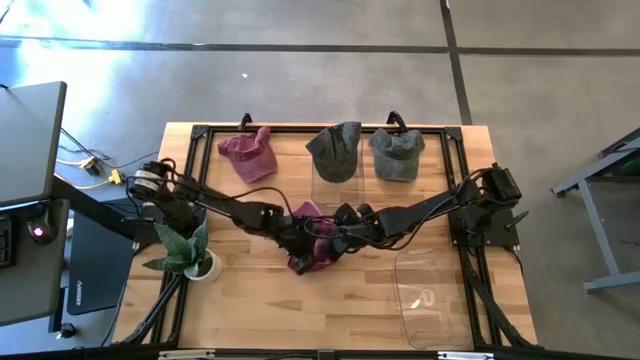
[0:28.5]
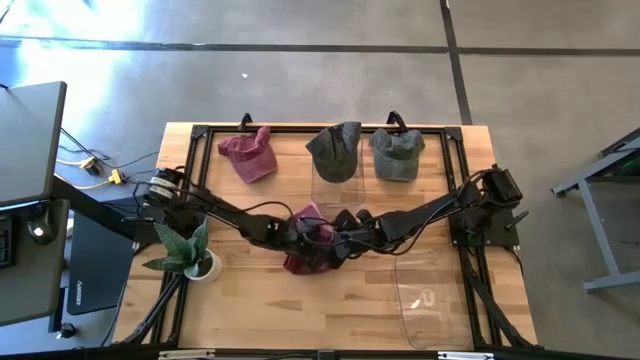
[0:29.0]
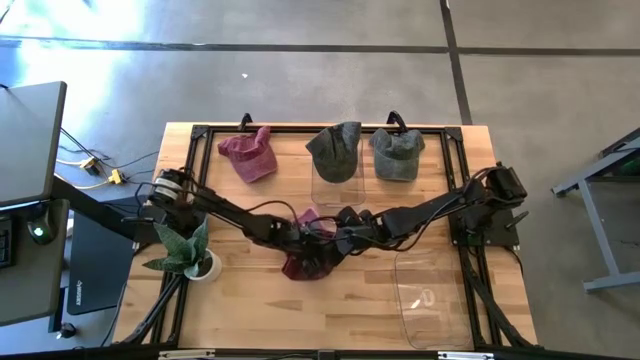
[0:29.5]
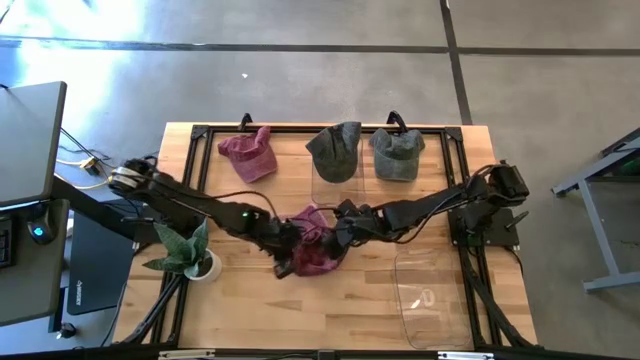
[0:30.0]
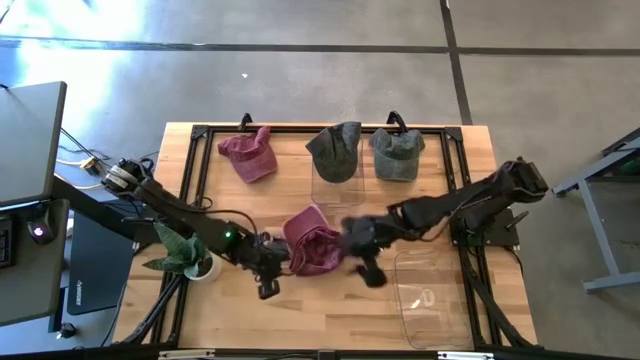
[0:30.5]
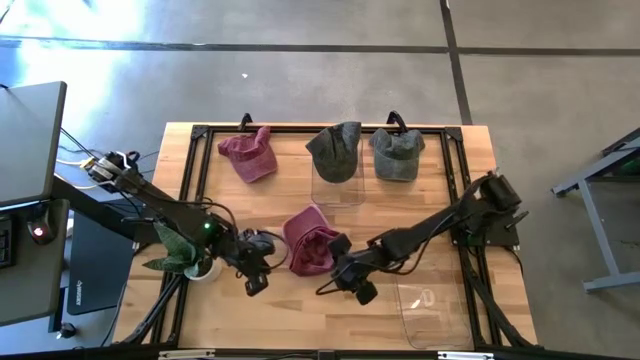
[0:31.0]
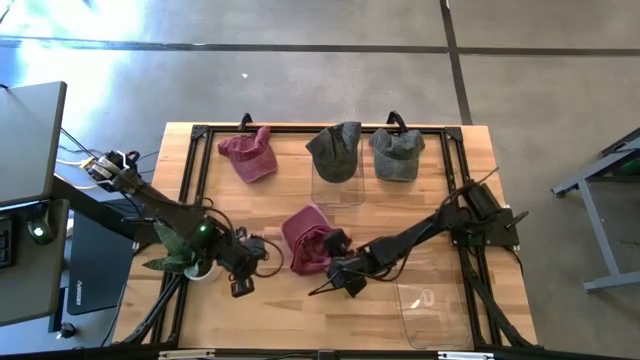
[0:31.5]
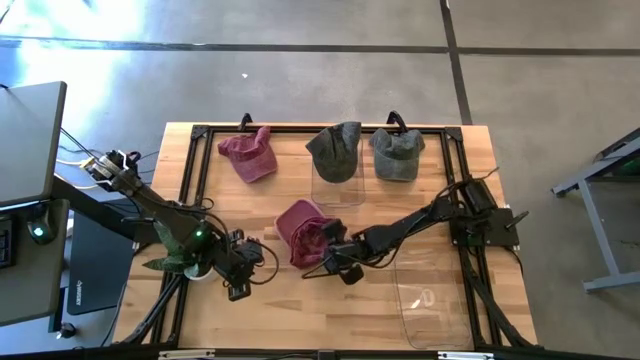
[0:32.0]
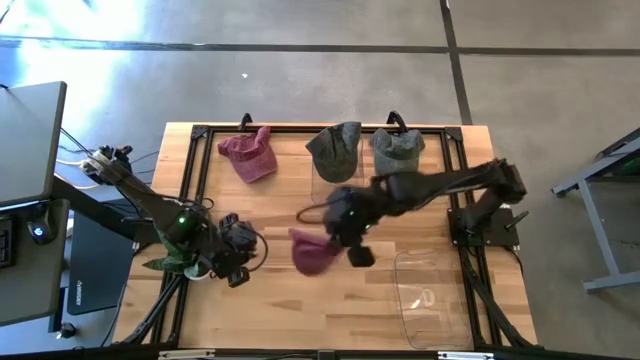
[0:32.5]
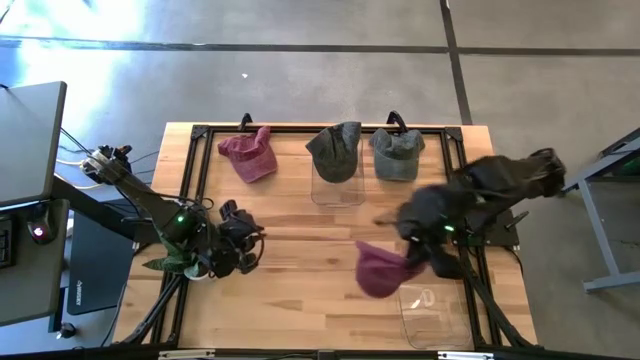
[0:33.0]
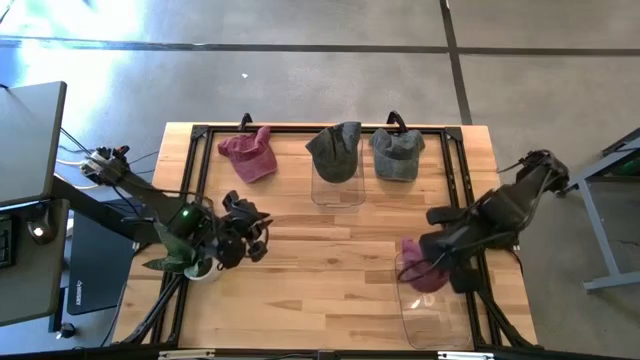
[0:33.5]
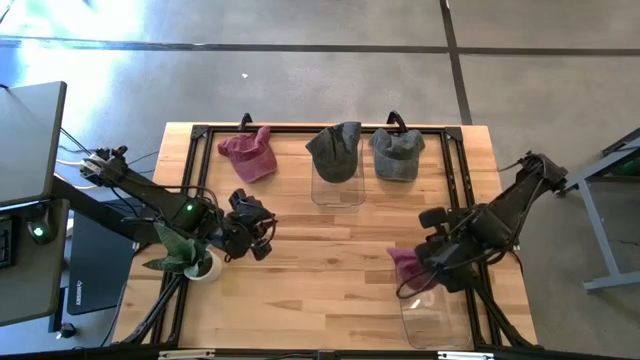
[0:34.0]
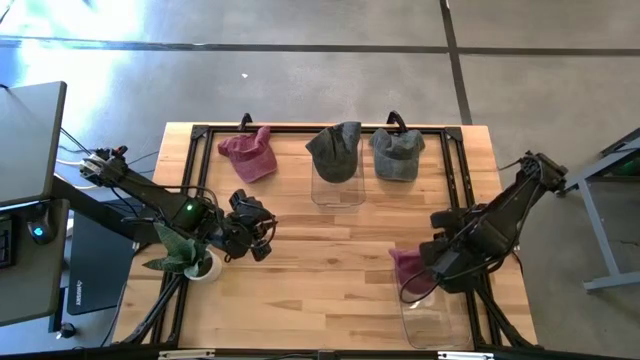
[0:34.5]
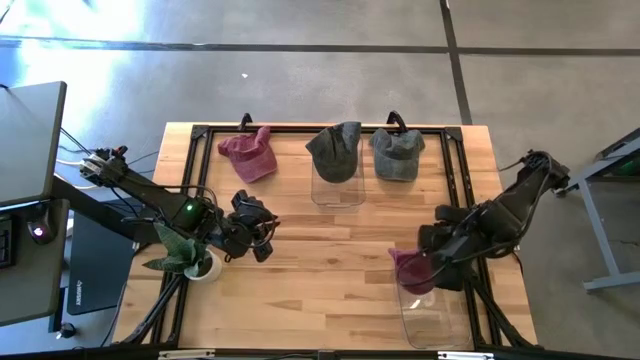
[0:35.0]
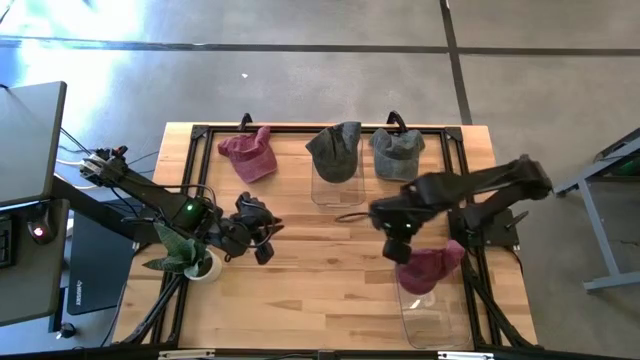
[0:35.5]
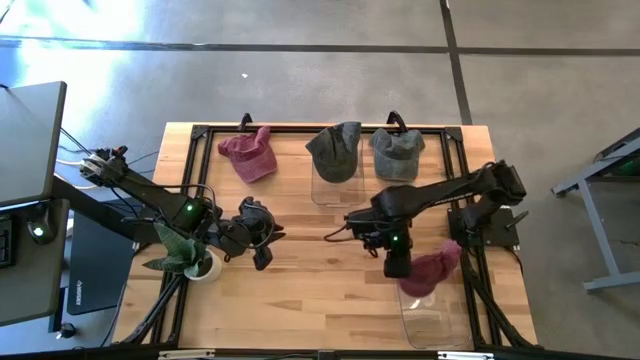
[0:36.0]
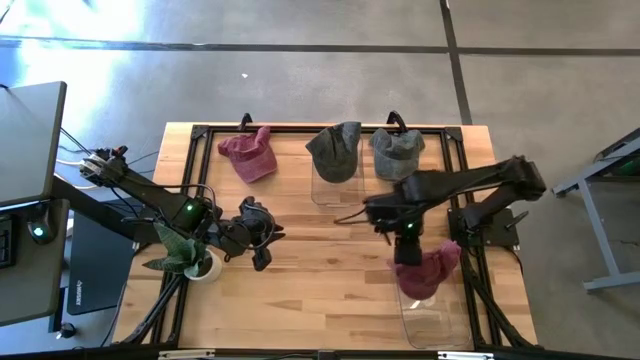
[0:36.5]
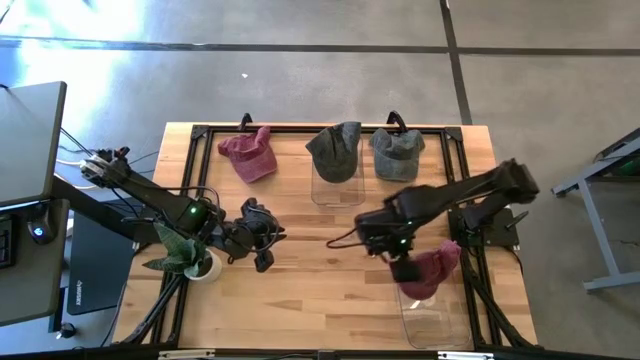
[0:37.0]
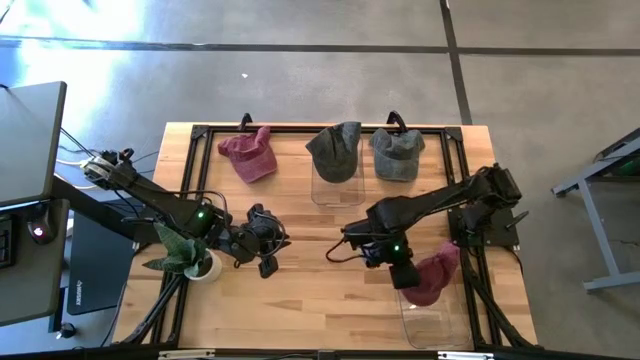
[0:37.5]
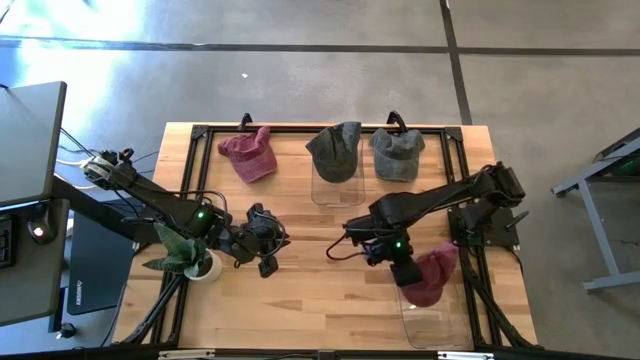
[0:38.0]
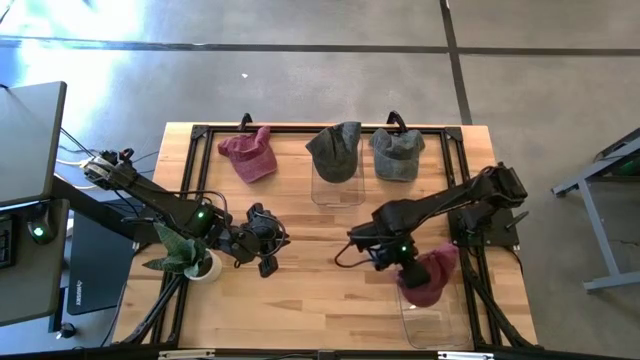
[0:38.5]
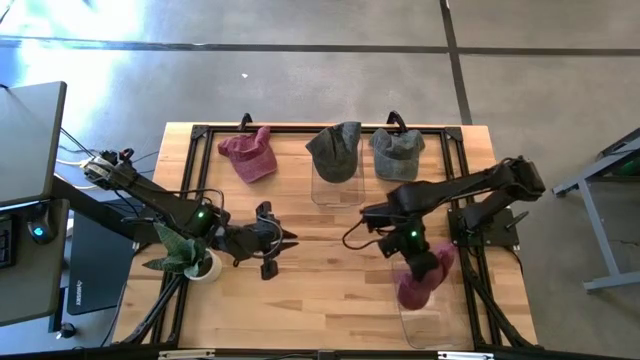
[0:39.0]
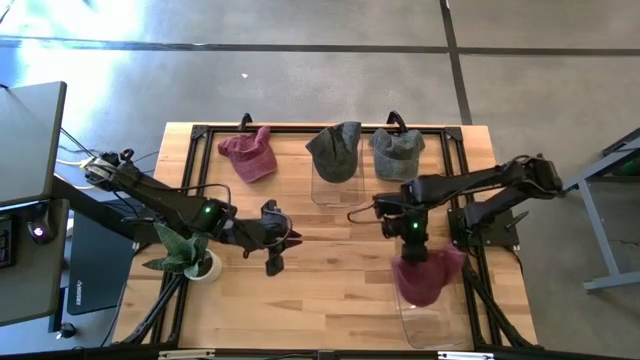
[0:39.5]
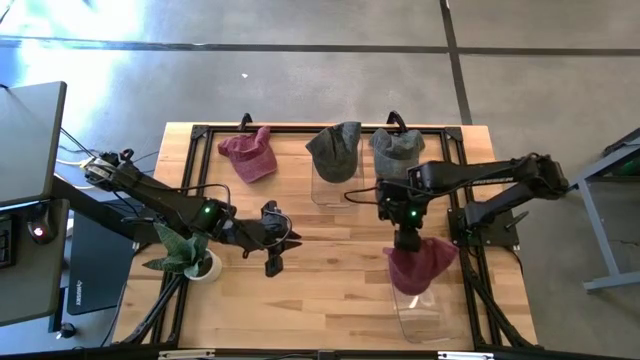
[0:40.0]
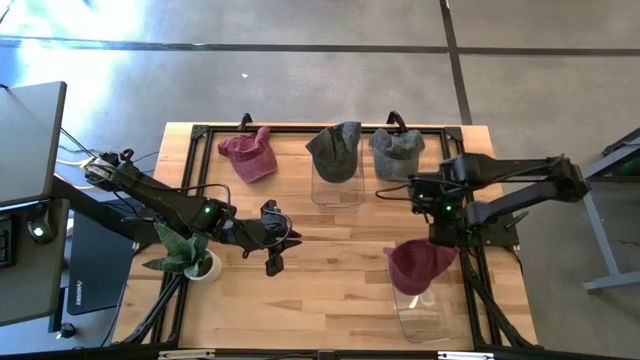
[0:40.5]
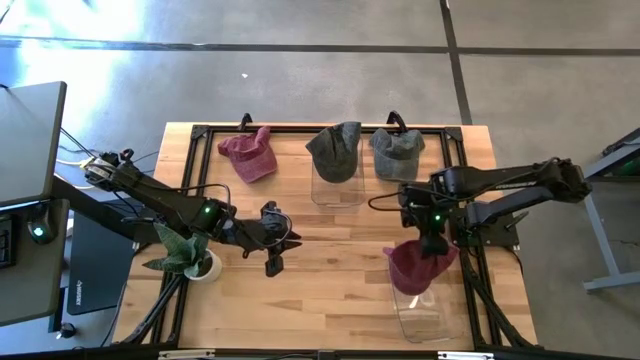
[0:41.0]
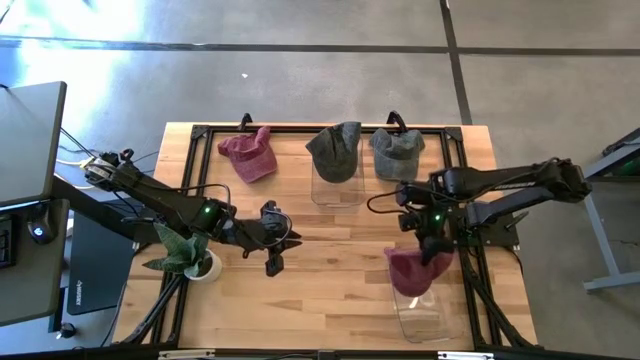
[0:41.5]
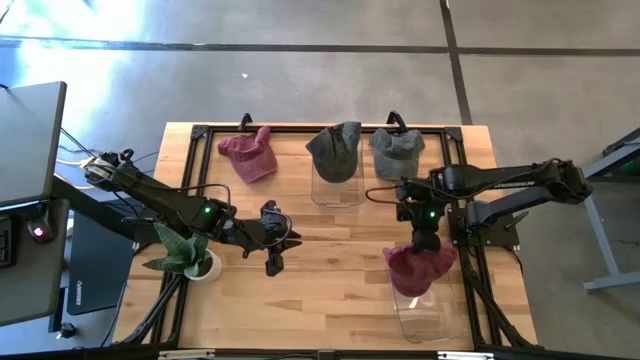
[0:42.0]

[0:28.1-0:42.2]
Task: Pick & Place hat
Put the bottom red cap into the bottom transparent bin

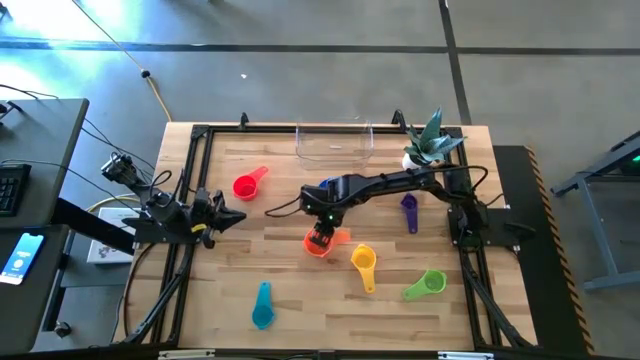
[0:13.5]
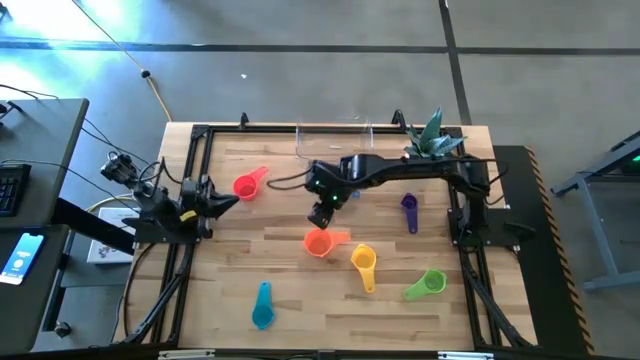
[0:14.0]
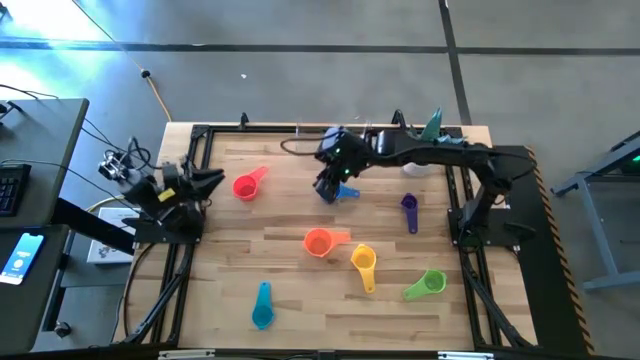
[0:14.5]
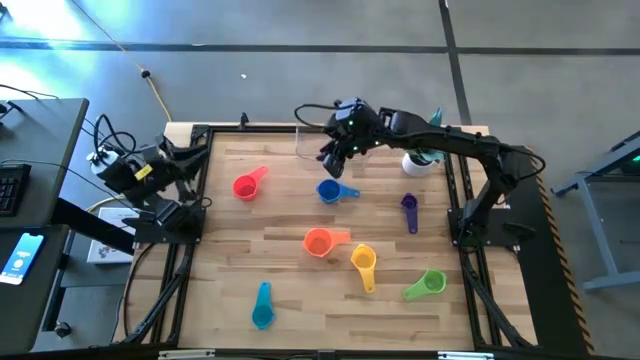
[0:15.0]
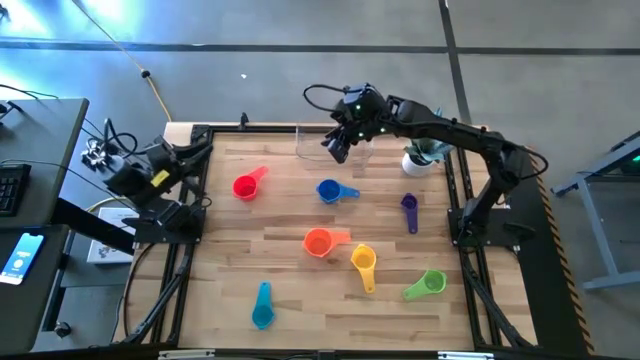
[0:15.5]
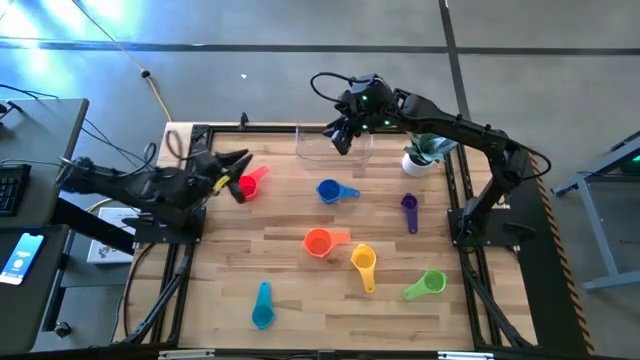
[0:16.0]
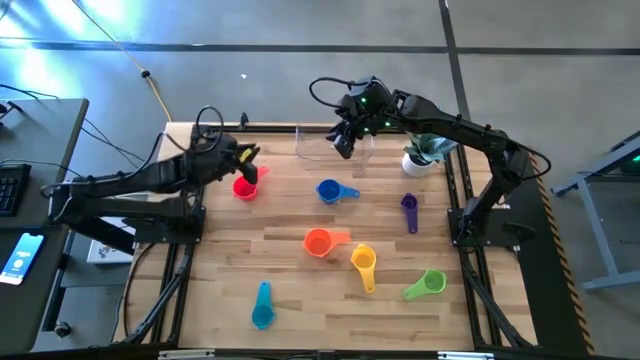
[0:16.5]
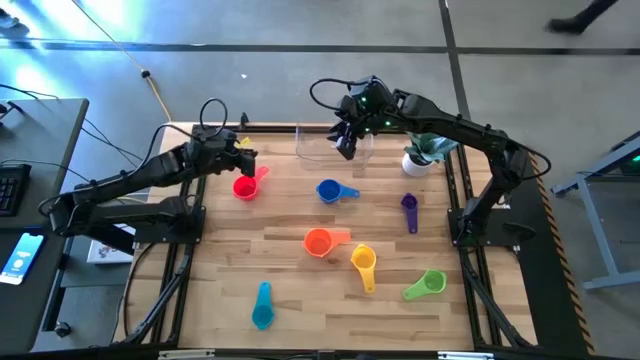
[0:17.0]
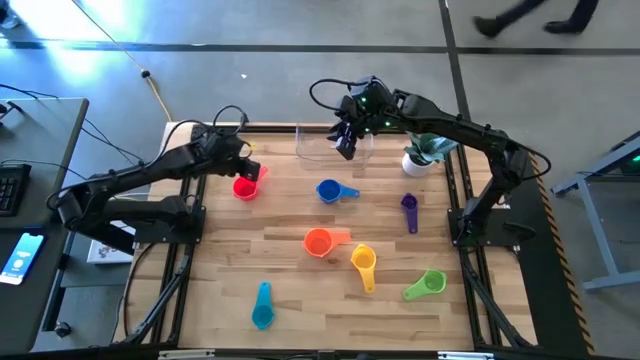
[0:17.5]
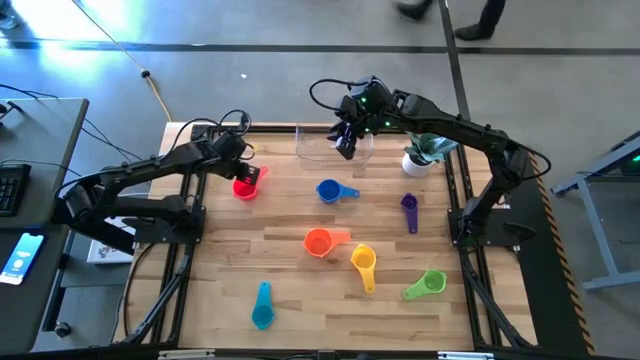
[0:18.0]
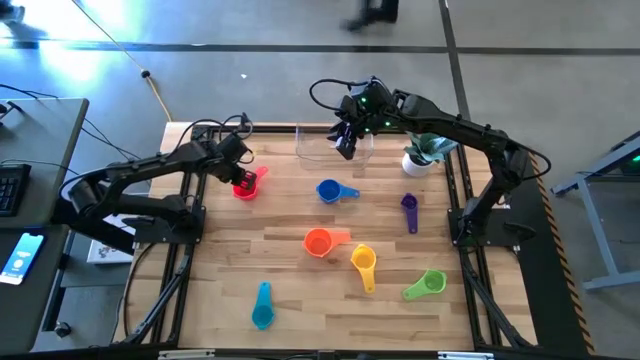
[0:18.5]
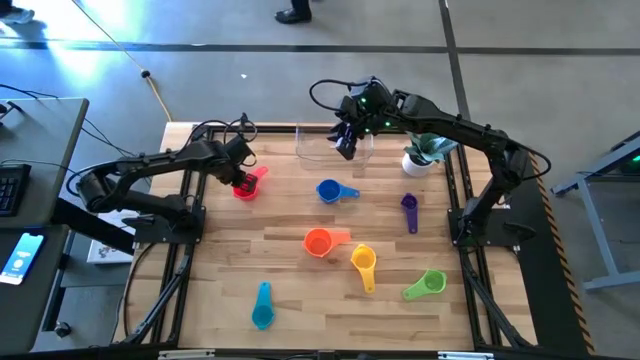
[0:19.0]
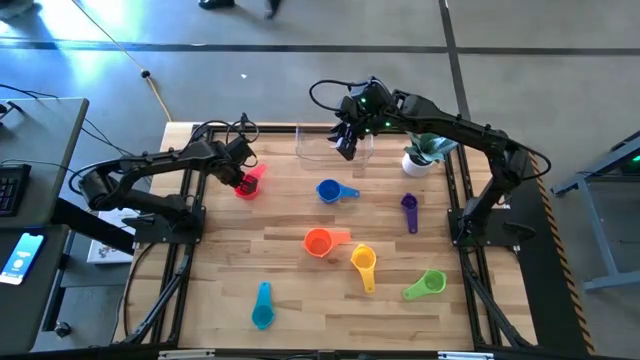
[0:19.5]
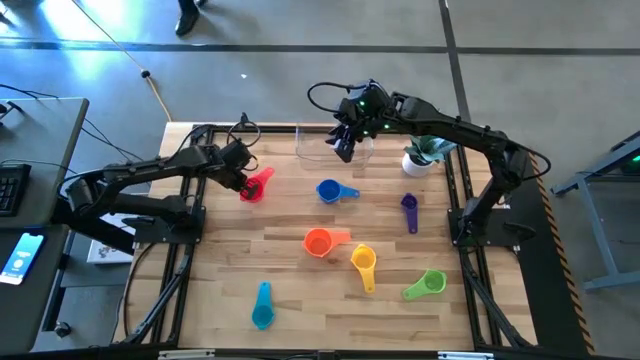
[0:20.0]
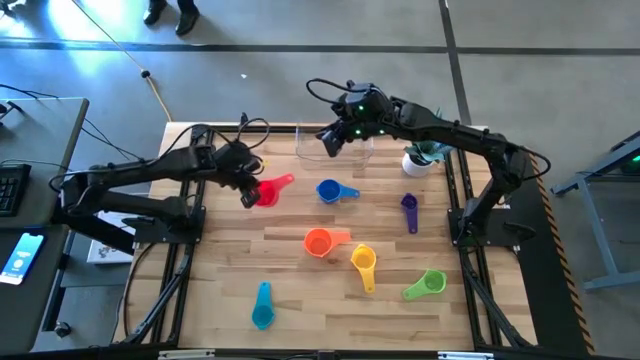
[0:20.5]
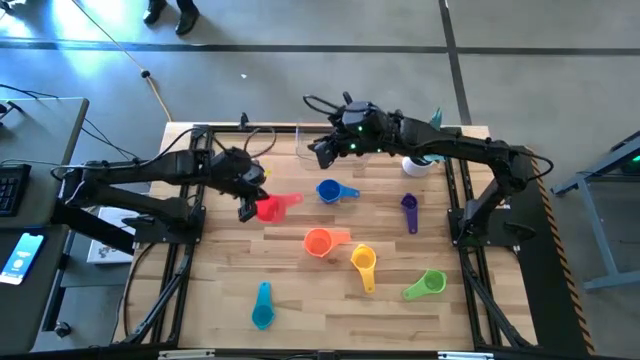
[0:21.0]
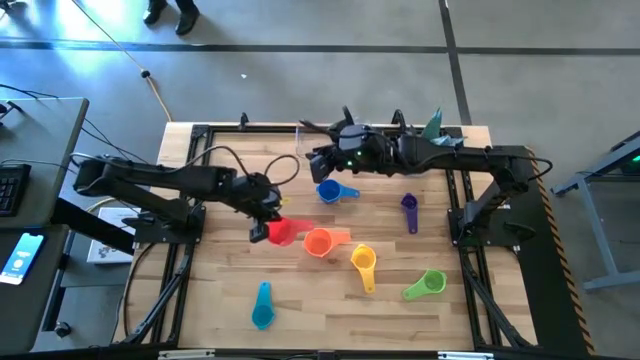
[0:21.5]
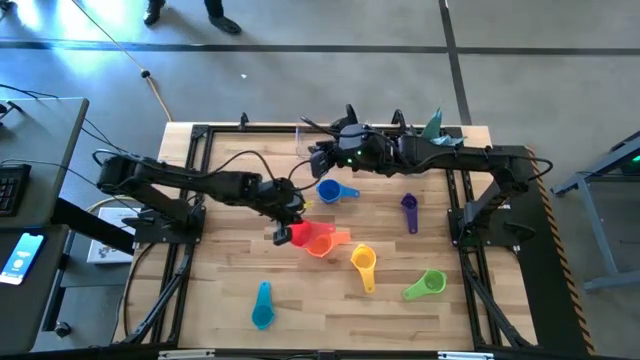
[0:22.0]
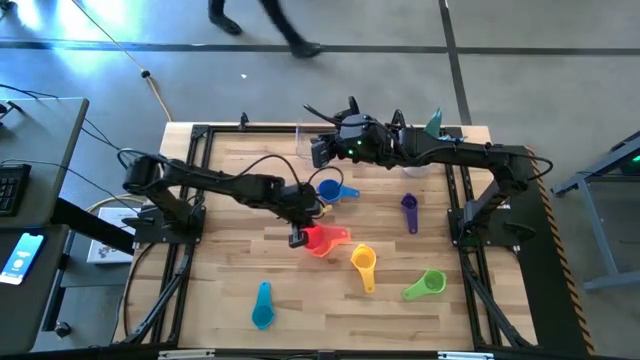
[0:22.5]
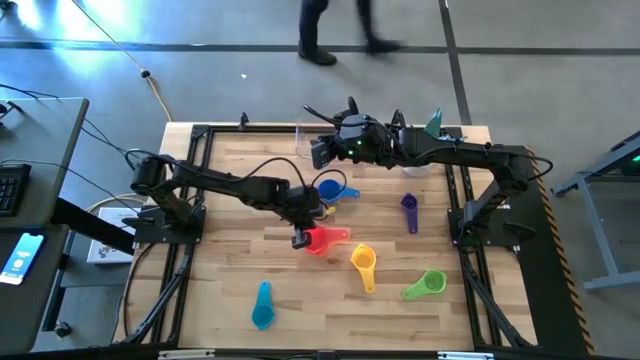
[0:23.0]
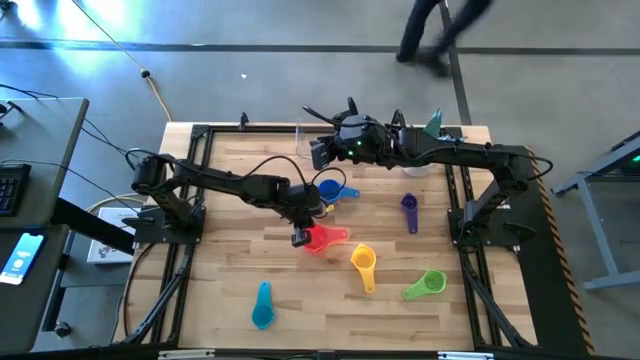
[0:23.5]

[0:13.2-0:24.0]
Task: Nest measuring cups in basket
Stack the red measuring cup on top of the orange measuring cup
